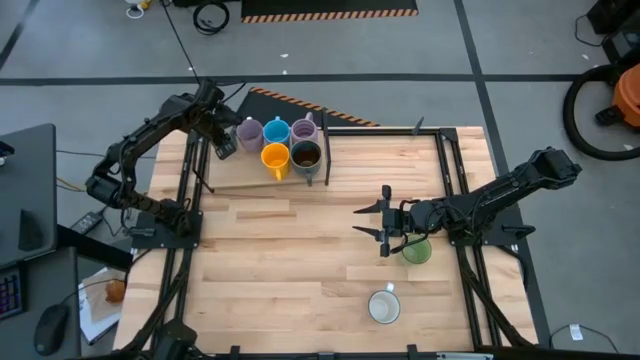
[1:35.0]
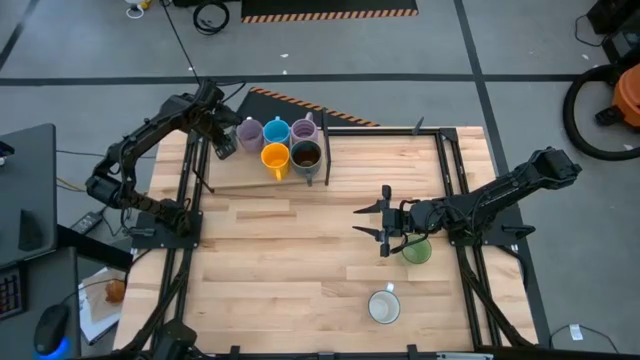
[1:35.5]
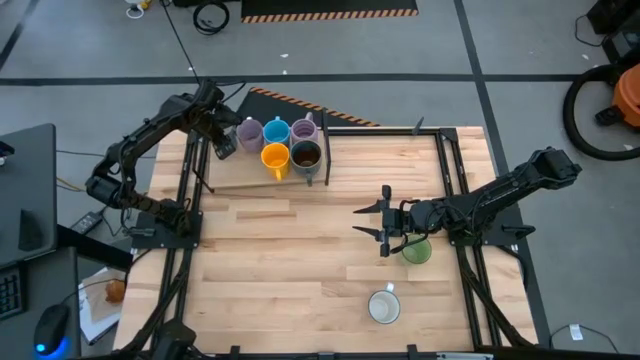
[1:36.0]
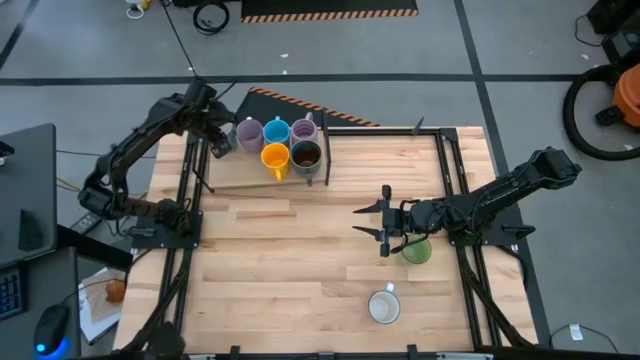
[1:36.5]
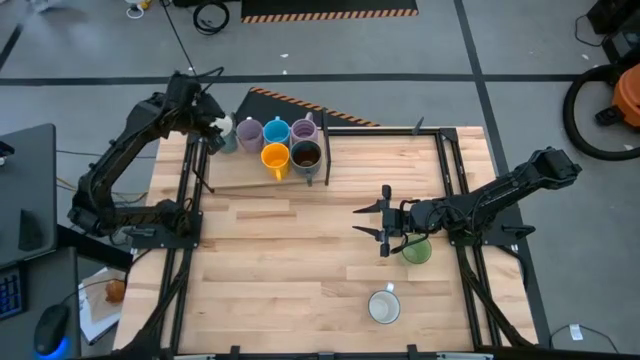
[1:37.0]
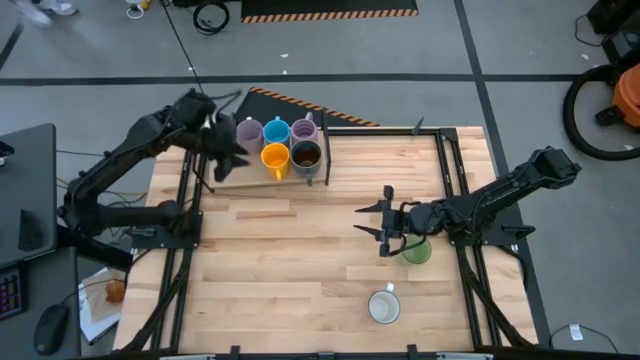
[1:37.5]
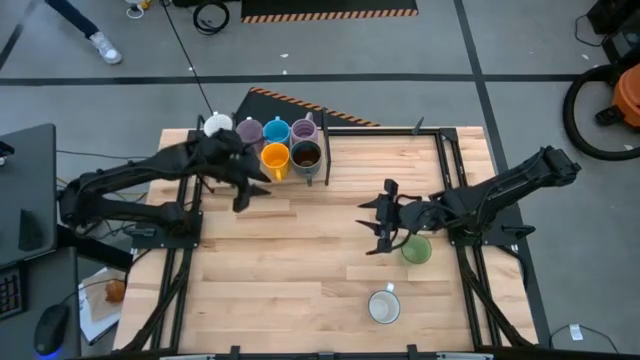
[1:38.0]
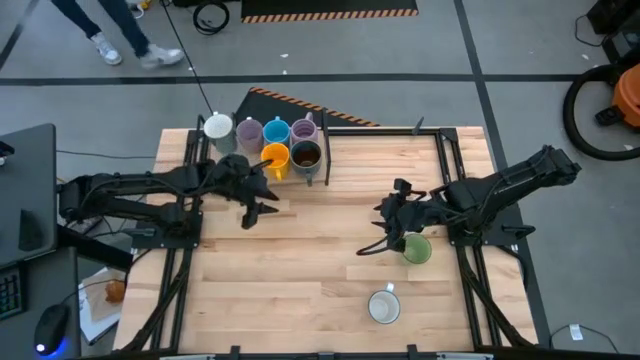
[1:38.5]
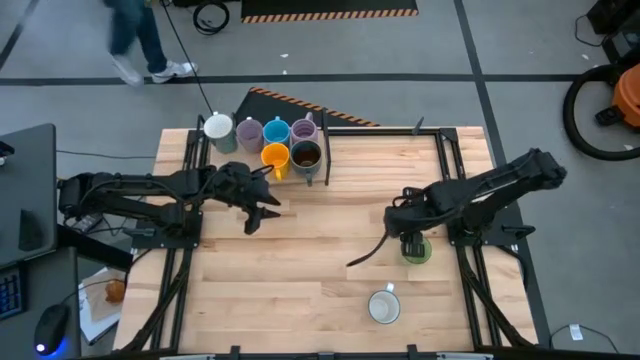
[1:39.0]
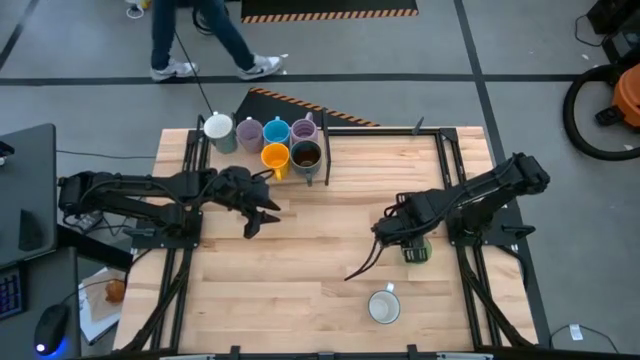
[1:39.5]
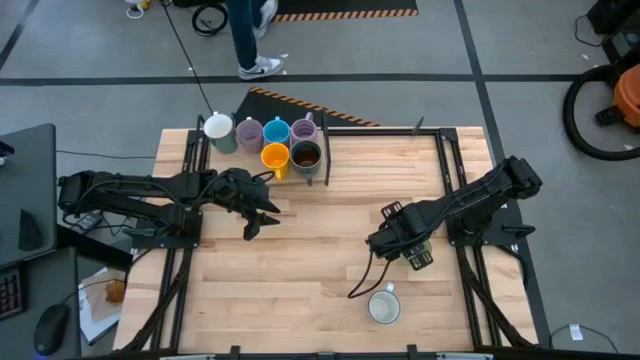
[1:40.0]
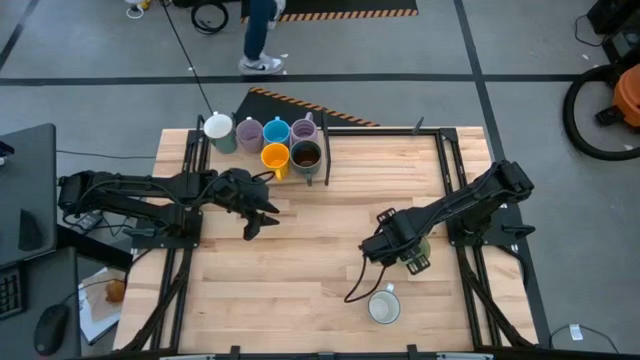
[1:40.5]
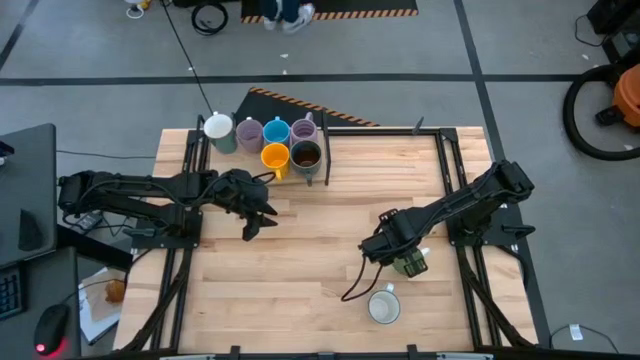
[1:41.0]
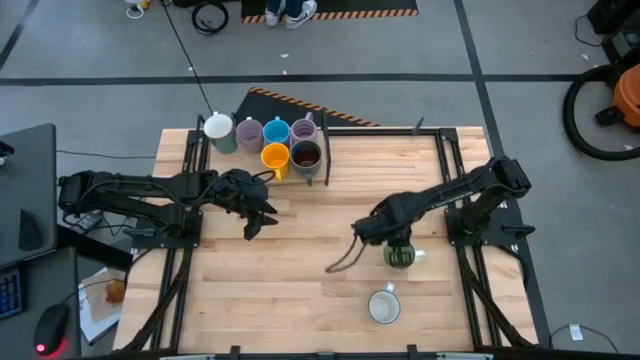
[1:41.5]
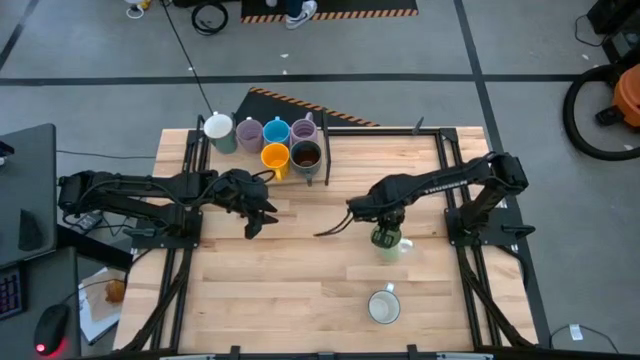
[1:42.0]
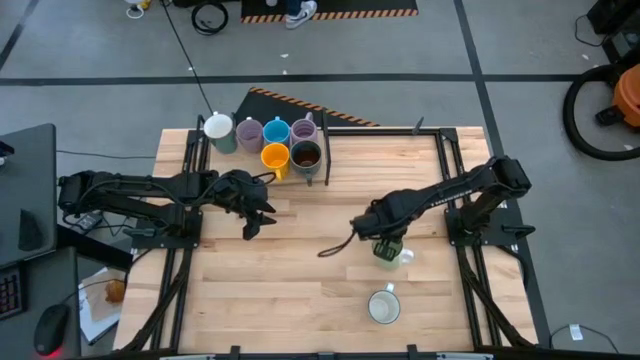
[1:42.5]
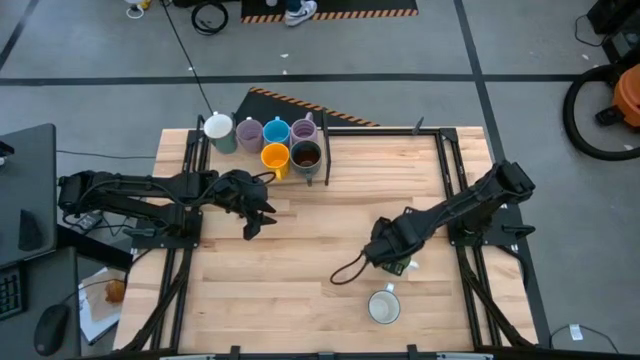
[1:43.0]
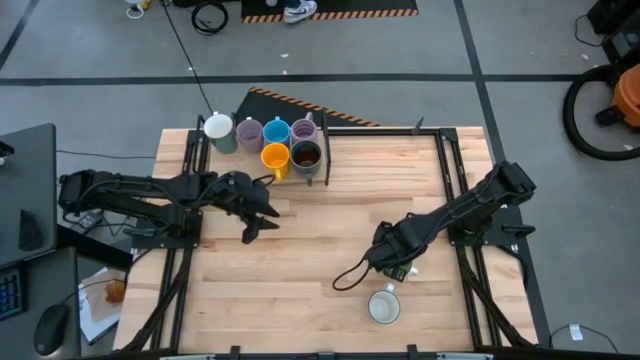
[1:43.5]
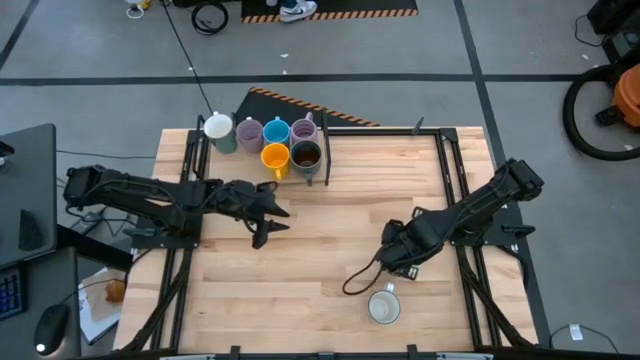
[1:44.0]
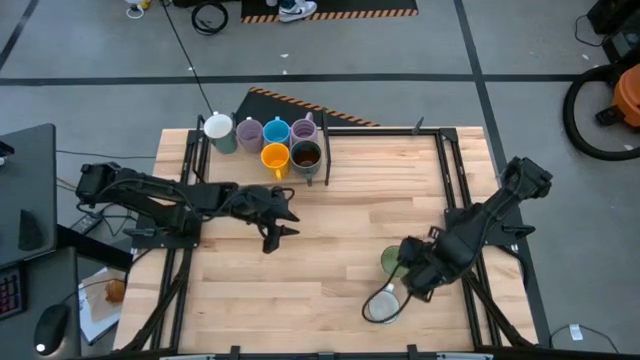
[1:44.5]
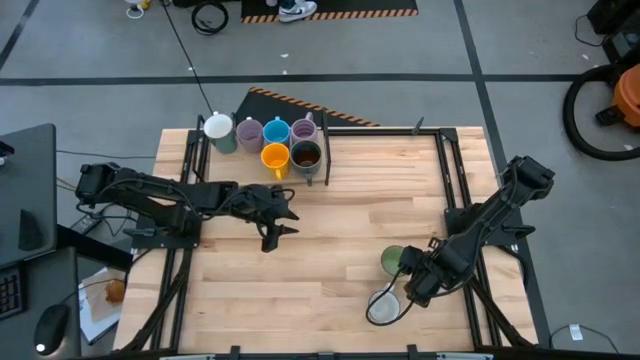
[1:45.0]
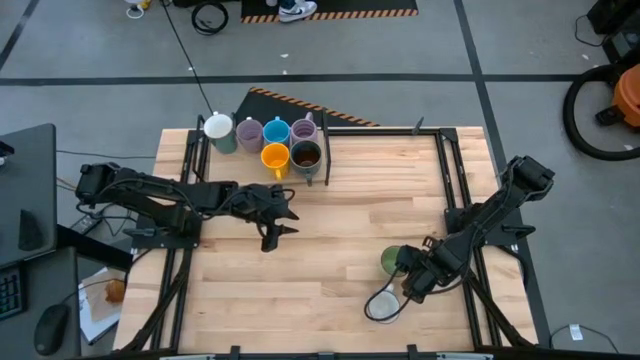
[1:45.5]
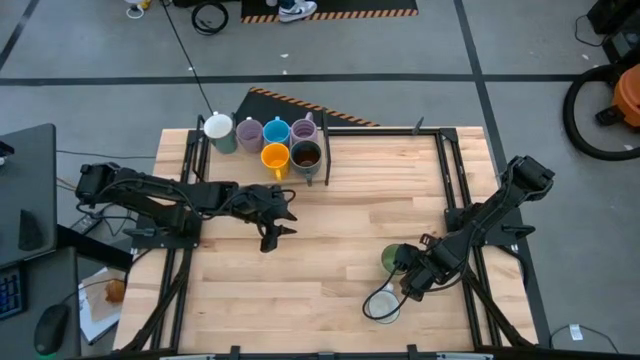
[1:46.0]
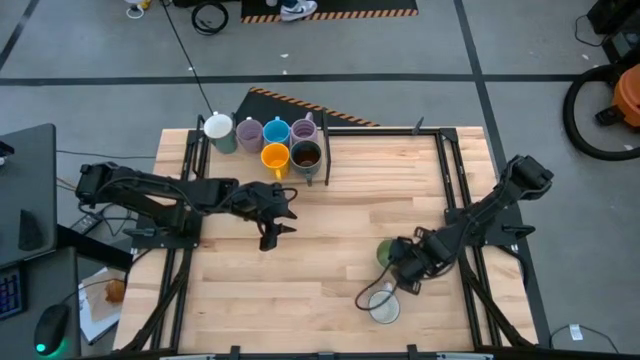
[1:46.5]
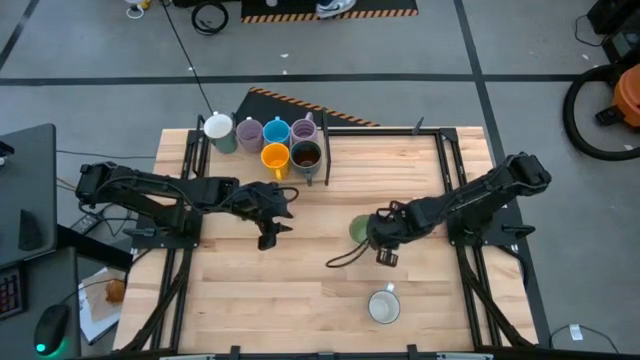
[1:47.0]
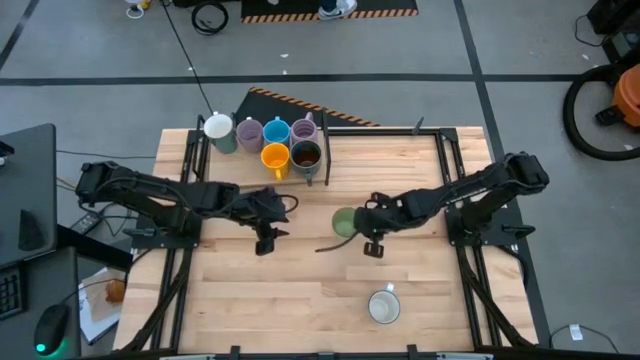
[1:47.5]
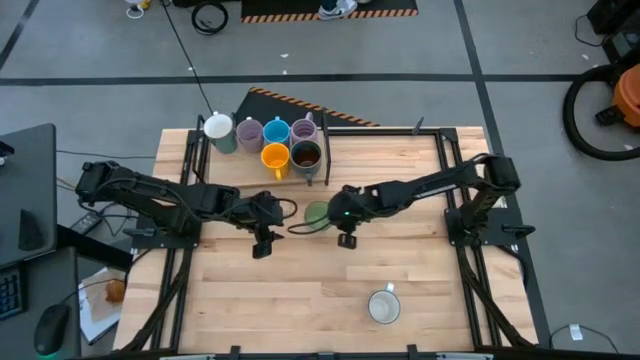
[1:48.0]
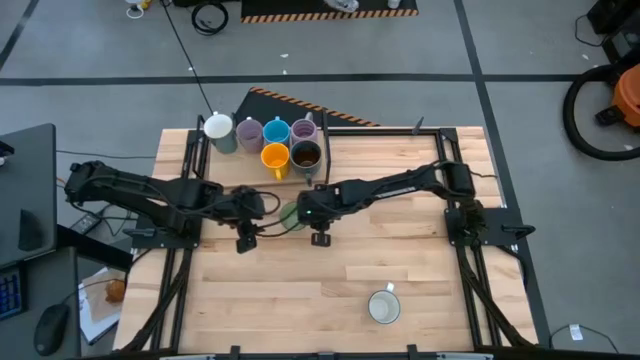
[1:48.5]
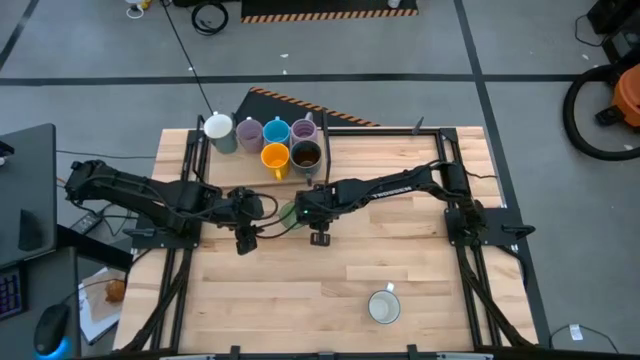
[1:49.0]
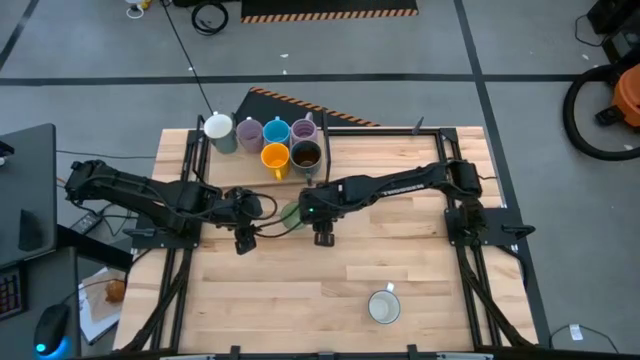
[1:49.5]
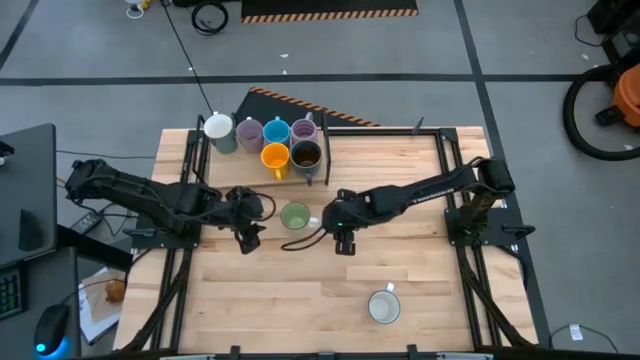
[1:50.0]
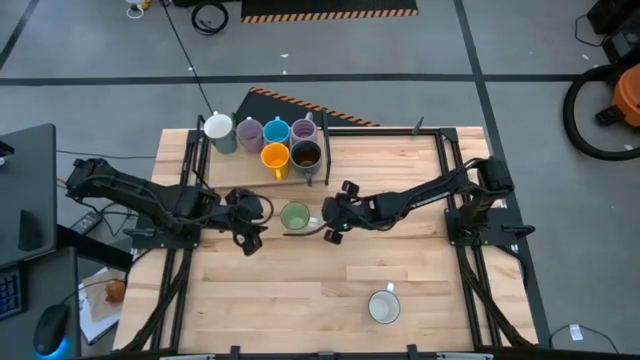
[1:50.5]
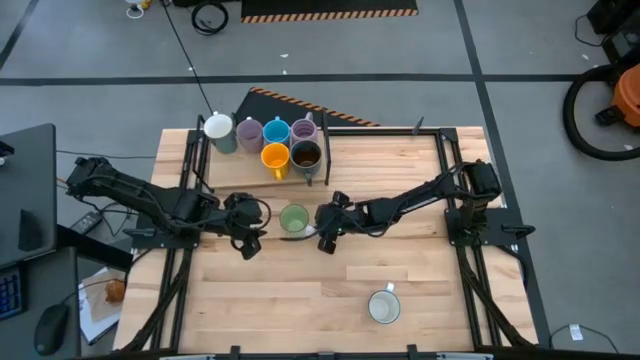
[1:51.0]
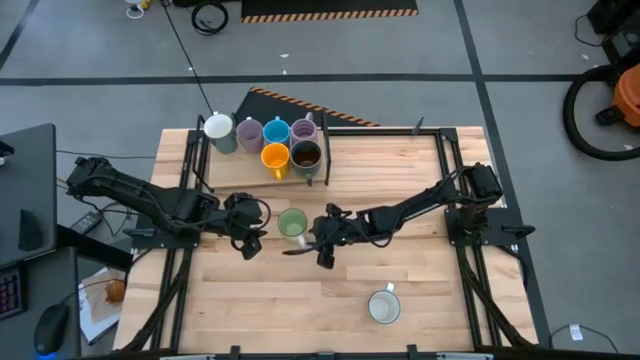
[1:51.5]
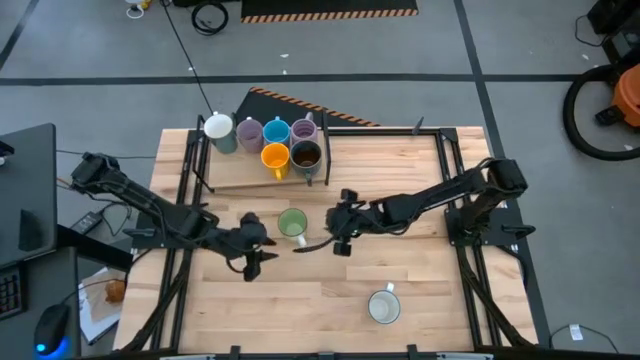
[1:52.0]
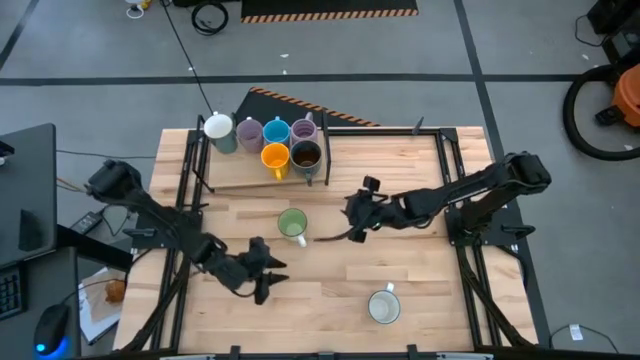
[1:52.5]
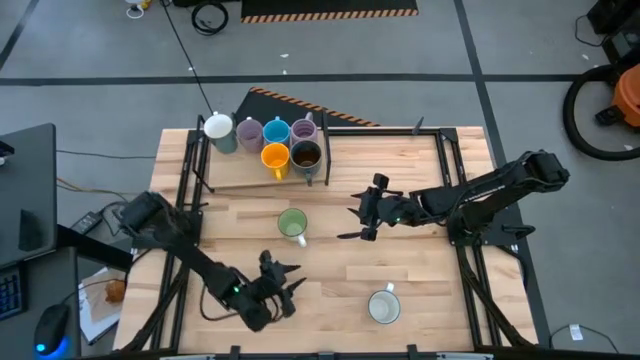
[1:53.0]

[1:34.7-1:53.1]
Task: Place coffee mugs
Put the green mug on the shelf

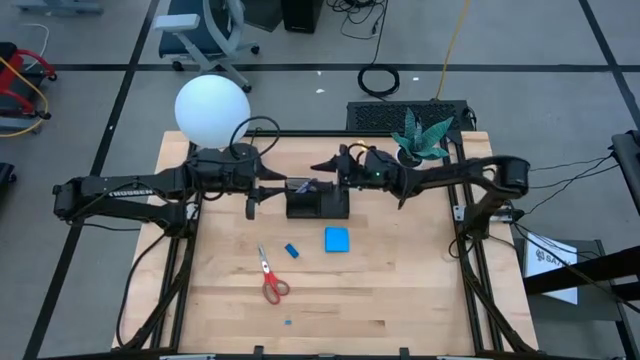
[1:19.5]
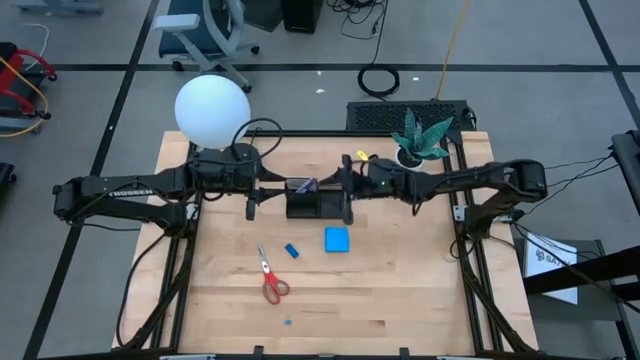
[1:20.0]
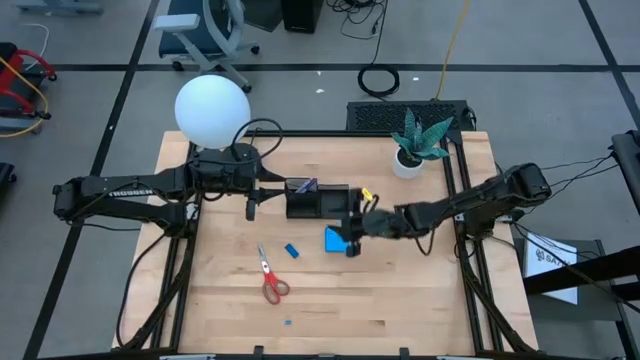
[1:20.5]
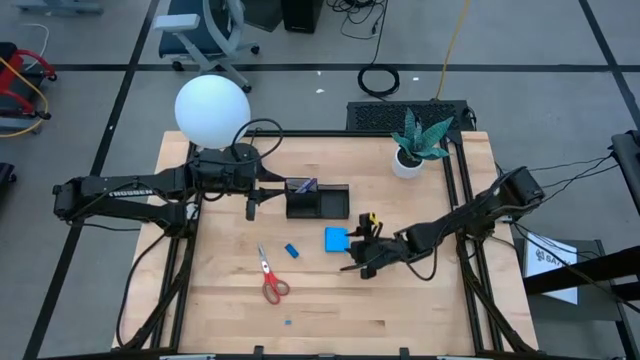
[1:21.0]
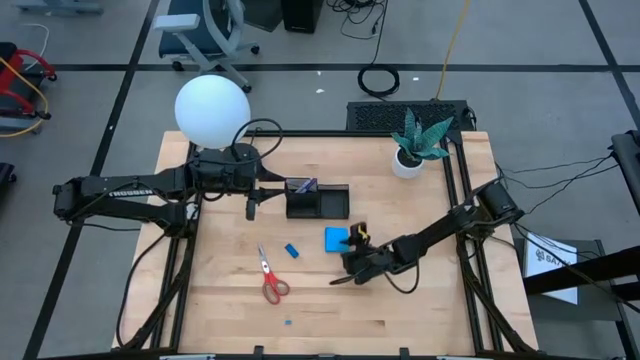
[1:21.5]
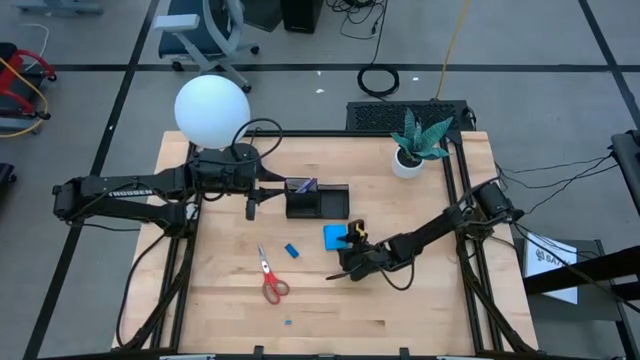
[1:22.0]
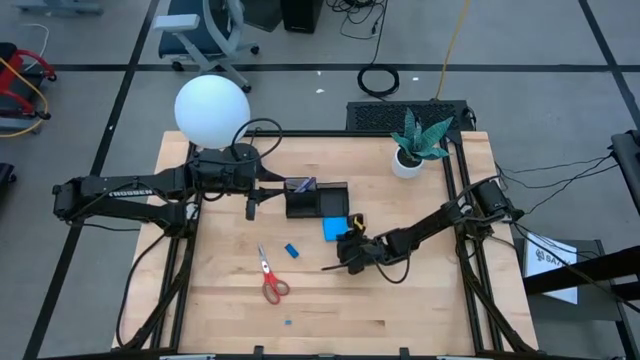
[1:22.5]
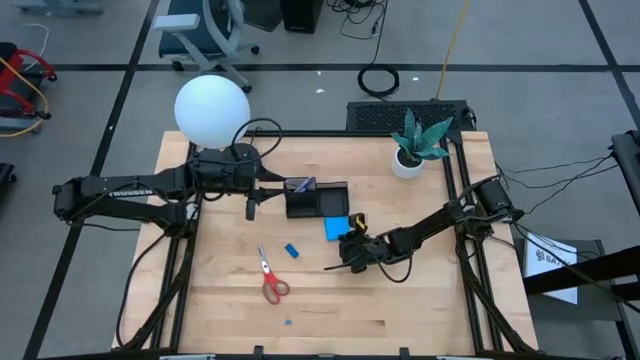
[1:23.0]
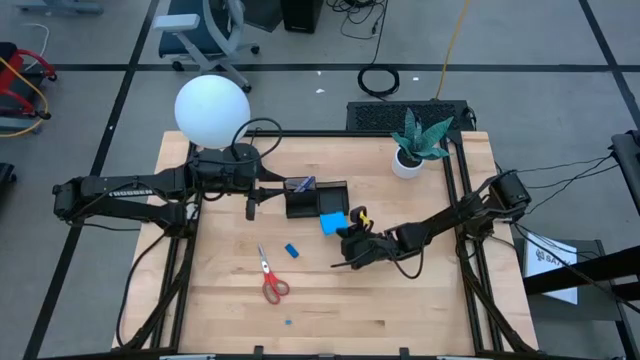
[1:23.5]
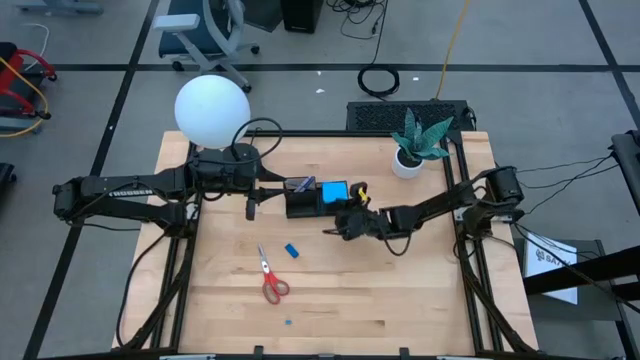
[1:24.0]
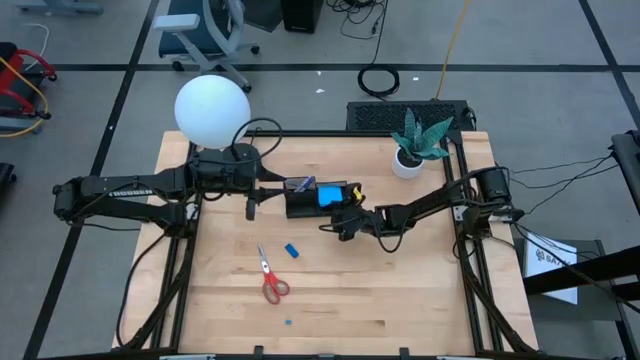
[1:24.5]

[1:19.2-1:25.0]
Task: Pick and place office supplies into organizer
Put the blue sticky note pad into the black mesh organizer
